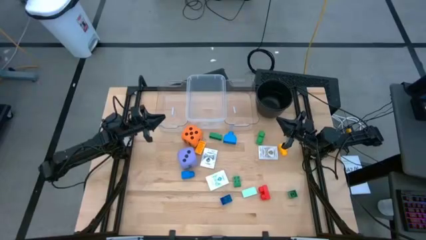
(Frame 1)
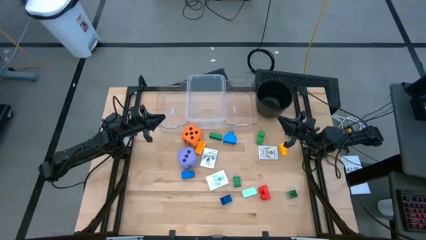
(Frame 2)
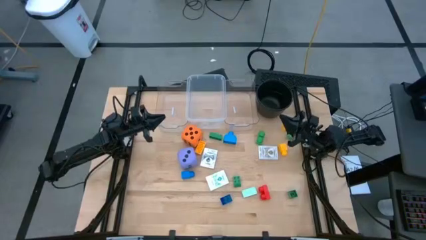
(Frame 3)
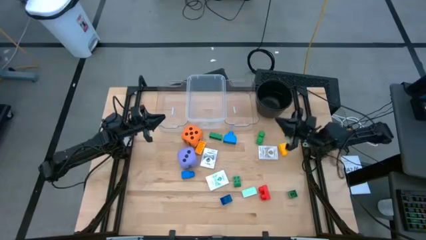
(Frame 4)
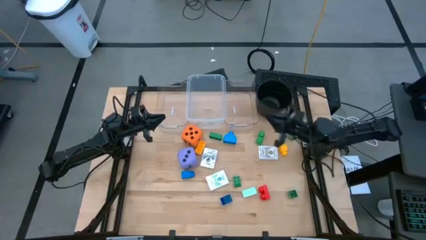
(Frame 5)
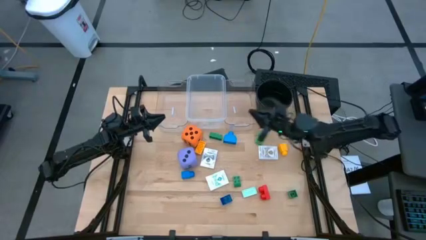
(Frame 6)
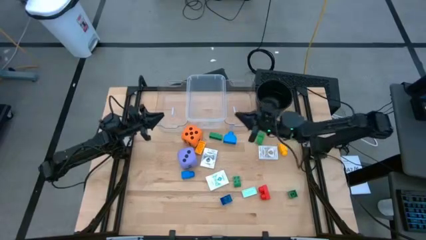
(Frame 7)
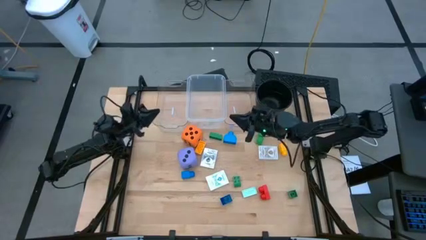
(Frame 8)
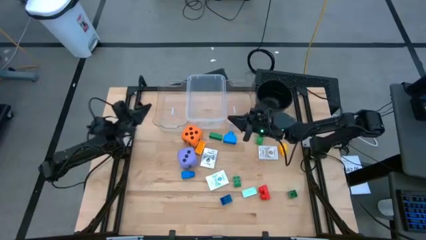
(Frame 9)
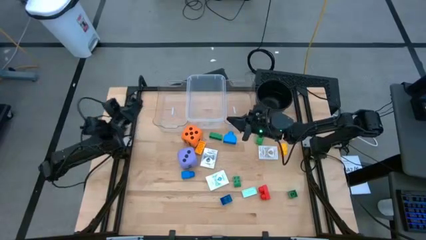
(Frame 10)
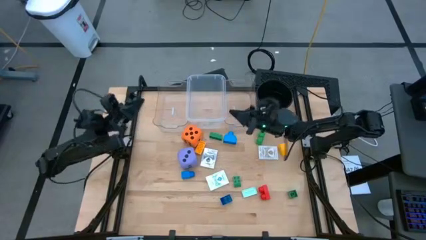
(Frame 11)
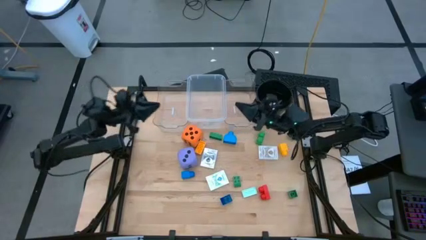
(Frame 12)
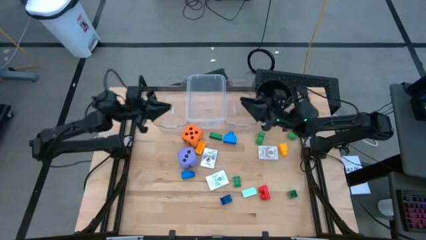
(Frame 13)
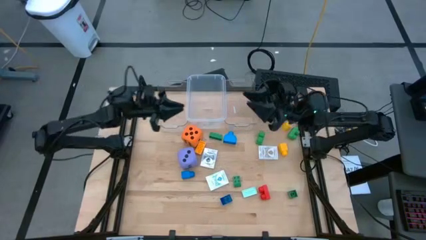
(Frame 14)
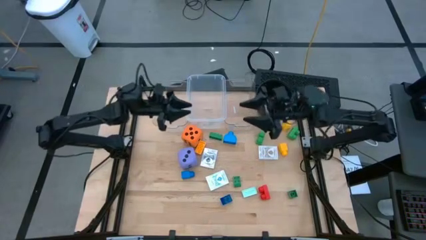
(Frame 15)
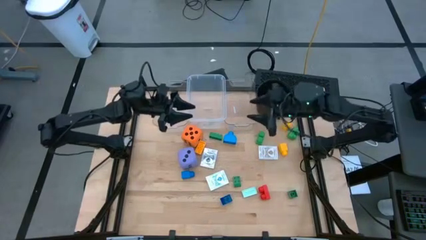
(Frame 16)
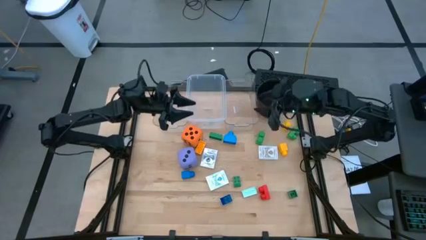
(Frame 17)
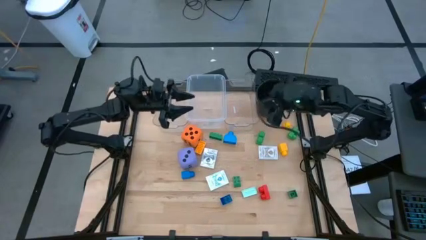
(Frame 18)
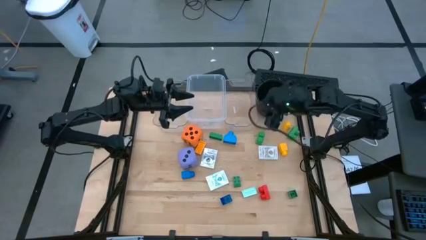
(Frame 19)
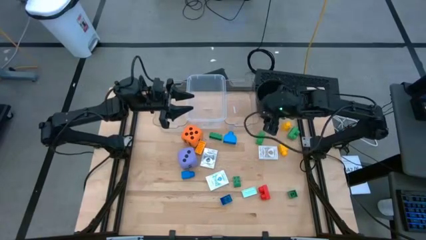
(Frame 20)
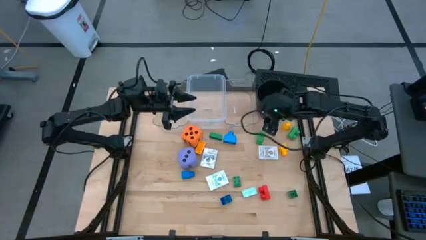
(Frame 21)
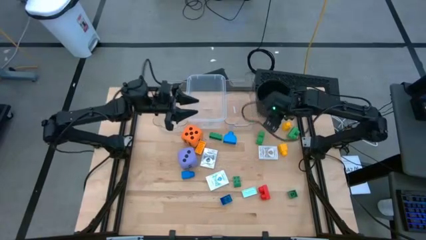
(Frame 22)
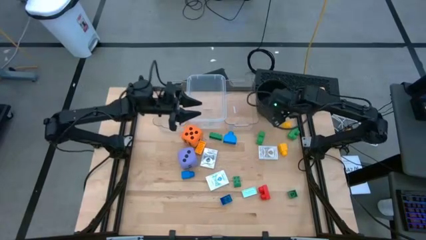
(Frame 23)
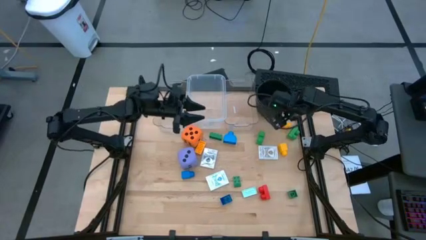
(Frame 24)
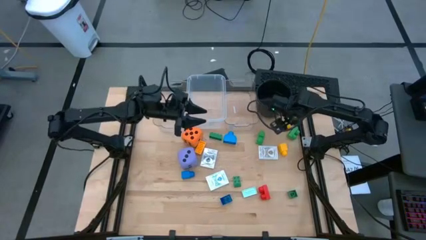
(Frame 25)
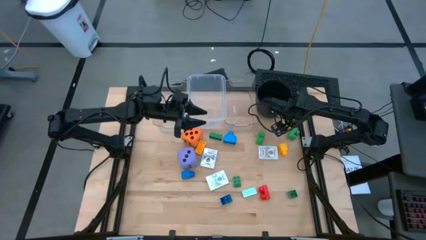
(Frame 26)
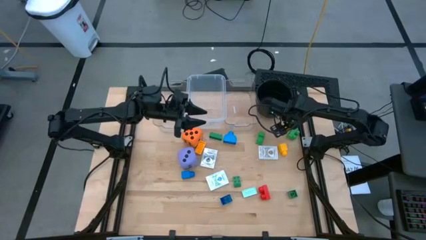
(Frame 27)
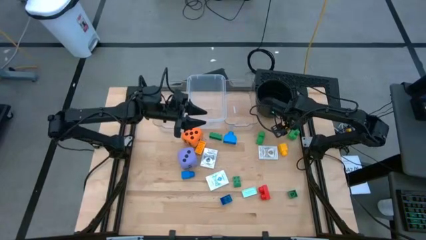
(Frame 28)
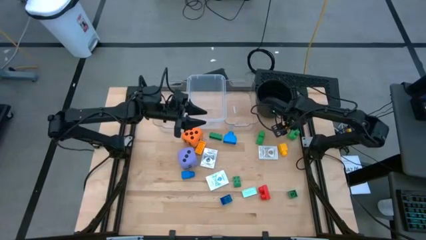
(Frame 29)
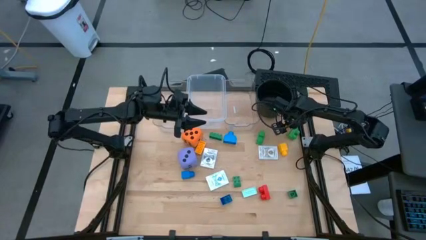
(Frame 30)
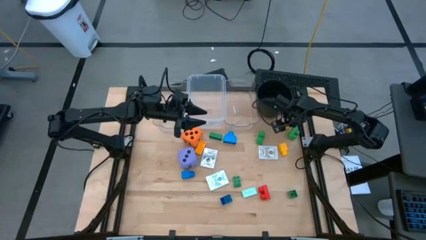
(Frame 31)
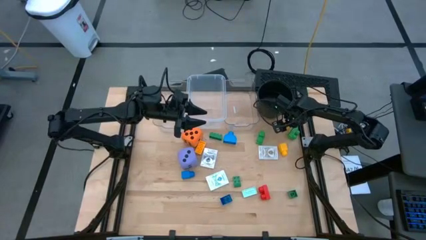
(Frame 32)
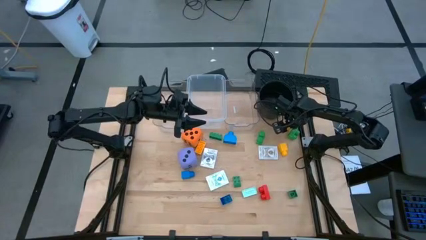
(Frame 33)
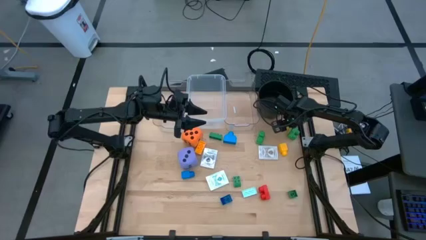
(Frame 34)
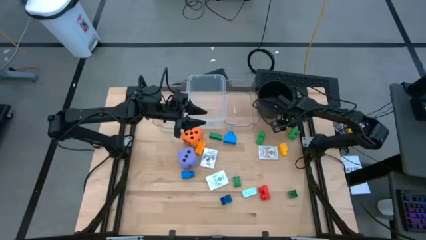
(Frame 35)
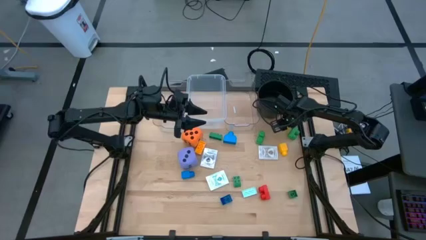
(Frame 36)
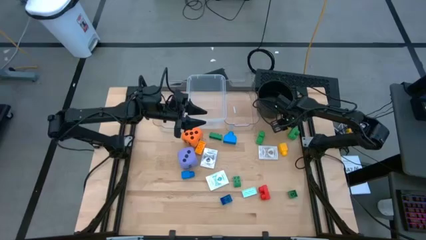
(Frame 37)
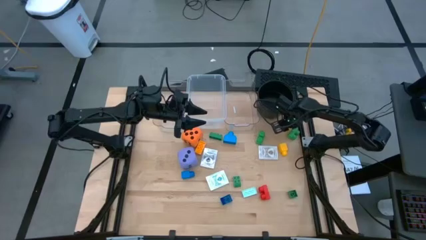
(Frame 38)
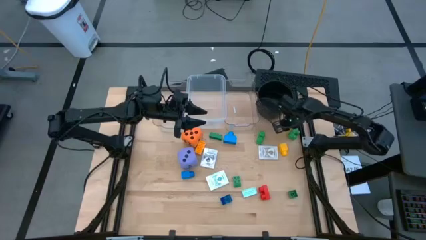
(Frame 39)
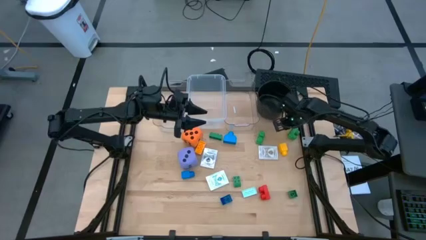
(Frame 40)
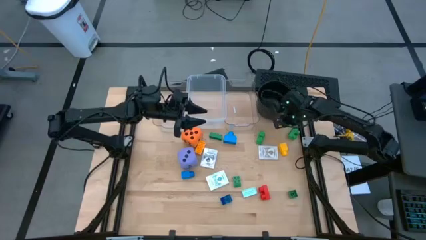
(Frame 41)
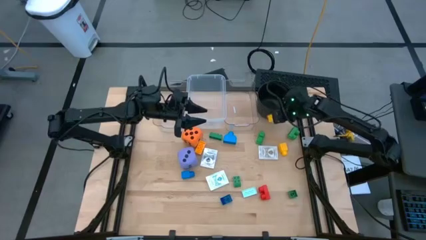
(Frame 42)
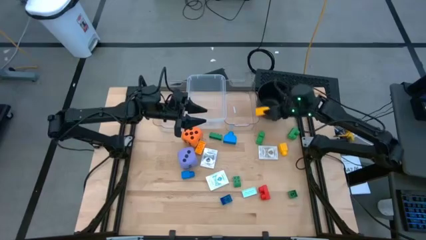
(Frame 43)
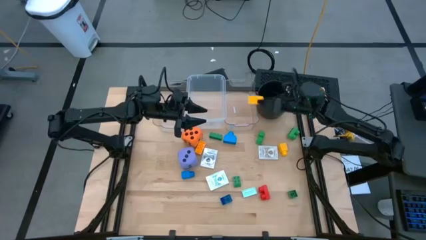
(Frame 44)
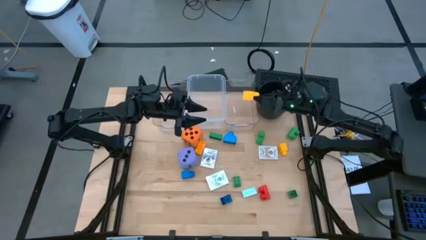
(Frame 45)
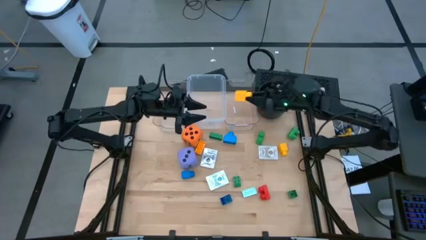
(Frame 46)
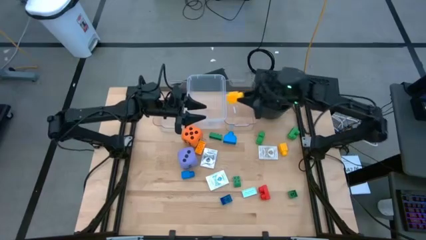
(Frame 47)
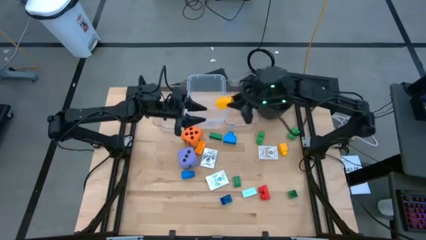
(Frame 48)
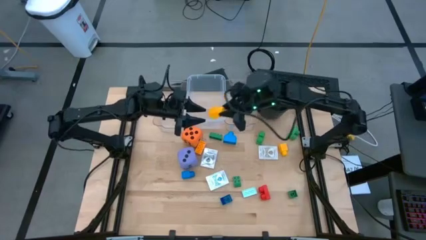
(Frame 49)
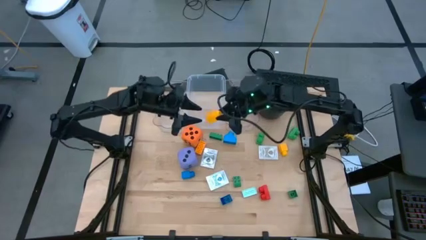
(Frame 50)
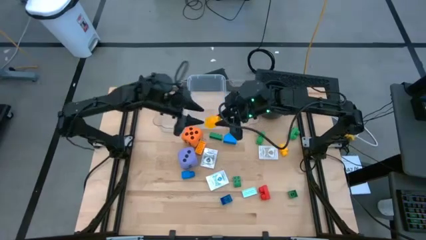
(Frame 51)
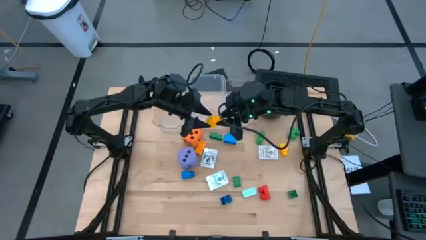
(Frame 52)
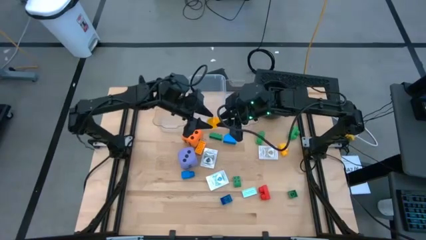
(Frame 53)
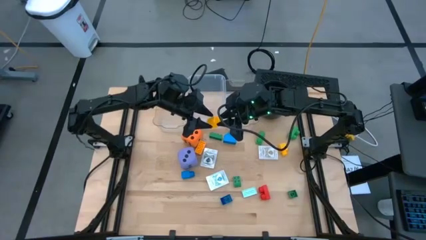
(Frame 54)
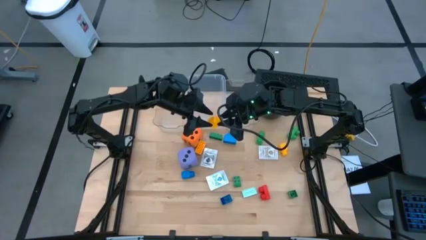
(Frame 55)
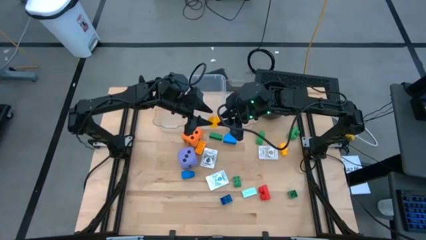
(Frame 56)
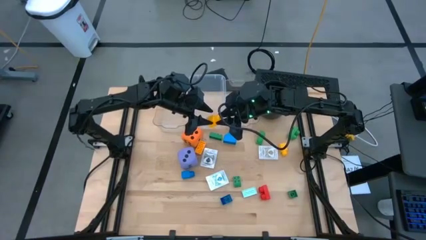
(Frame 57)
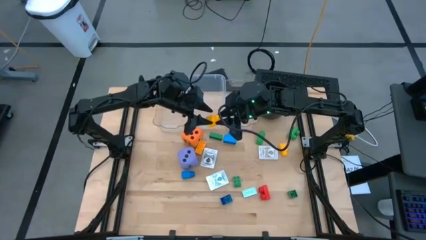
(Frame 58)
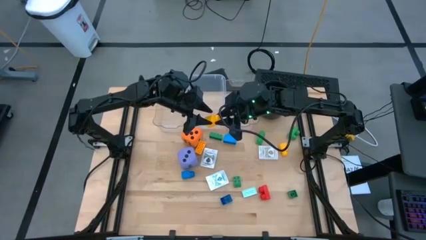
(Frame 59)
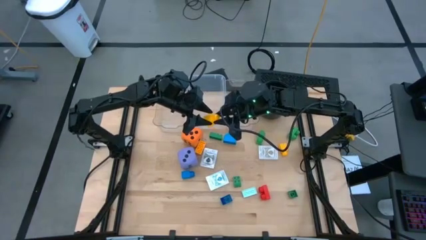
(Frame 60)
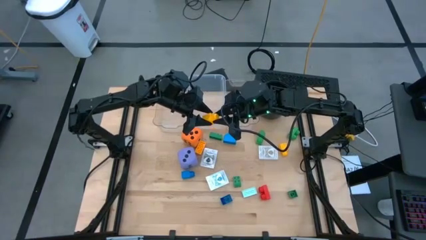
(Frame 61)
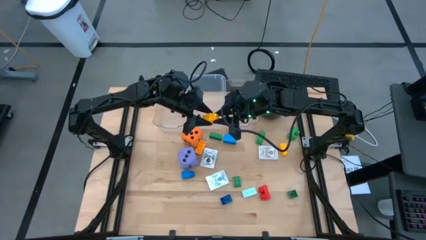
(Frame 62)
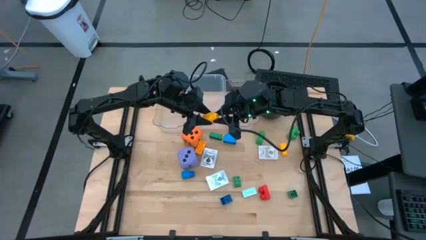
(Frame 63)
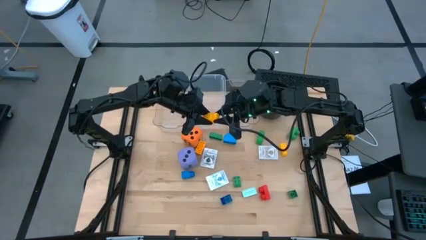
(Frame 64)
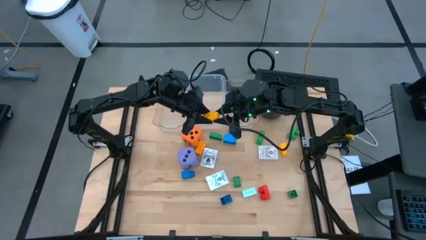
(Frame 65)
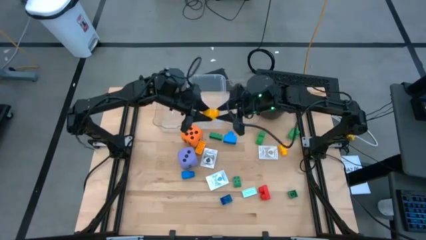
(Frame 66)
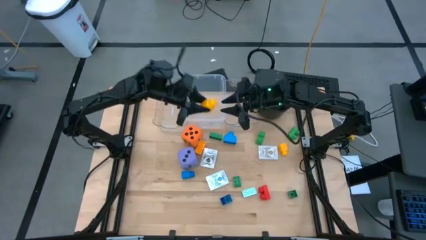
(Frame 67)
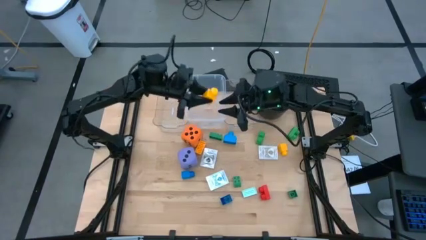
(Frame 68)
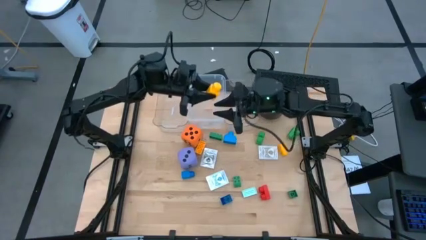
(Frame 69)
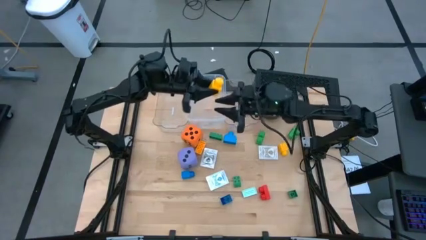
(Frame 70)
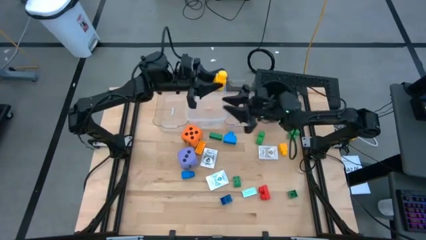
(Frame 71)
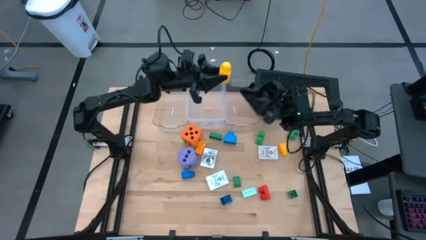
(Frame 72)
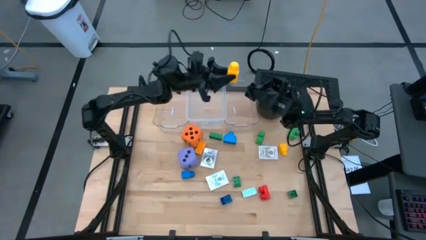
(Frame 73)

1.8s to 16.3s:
Task: Pick & Place Toys
Put the yellow one stud game piece into the middle transparent bin
